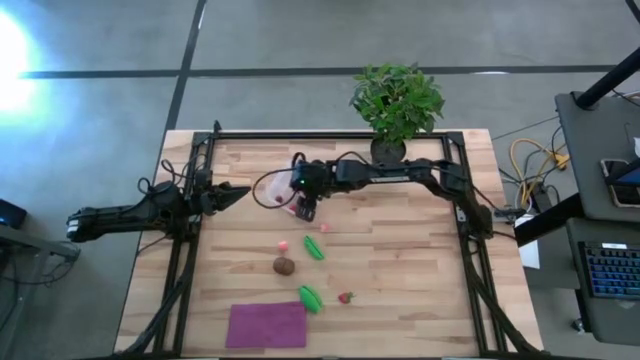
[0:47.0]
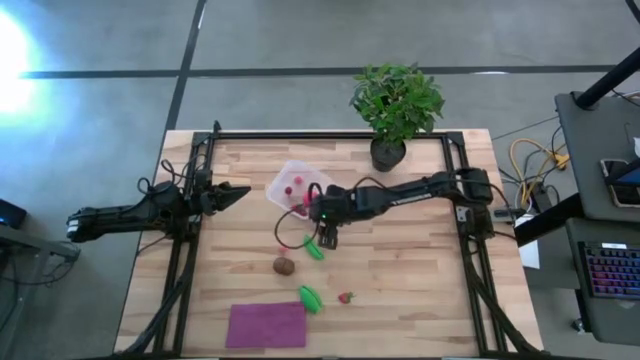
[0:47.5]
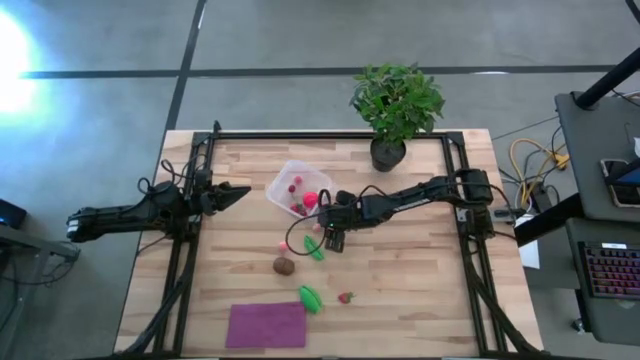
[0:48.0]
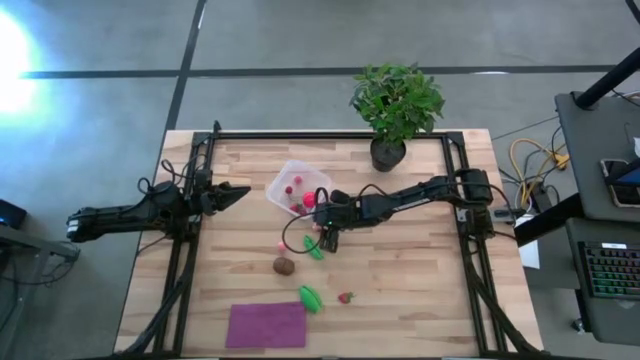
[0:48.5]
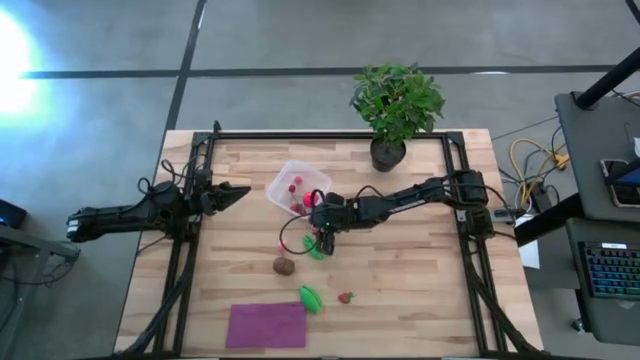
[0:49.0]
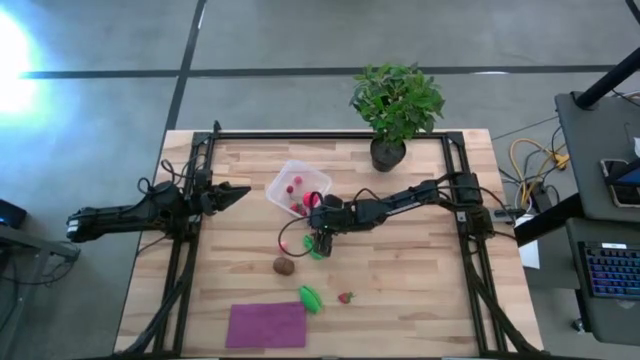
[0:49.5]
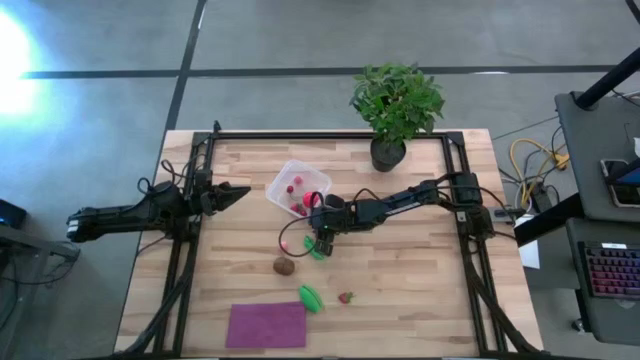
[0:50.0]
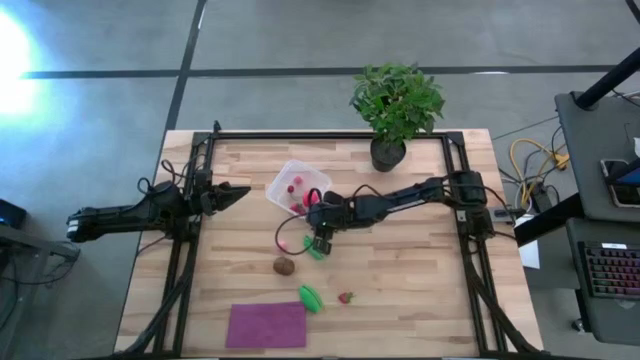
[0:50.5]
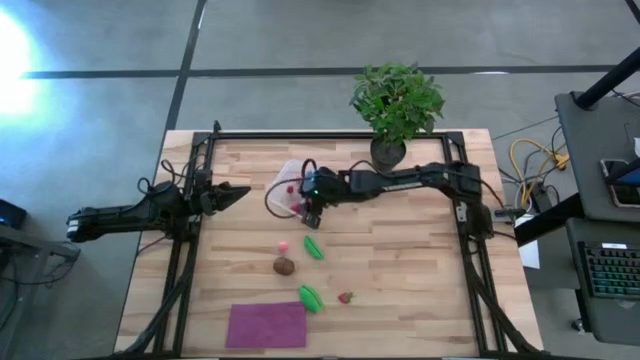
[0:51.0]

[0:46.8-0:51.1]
Task: Pick and placing Produce into tupperware
Put the top peach into the transparent bin

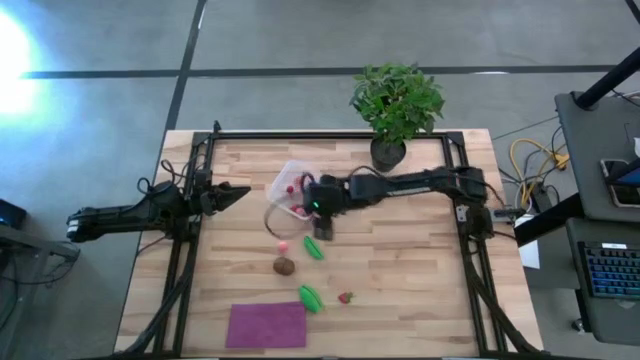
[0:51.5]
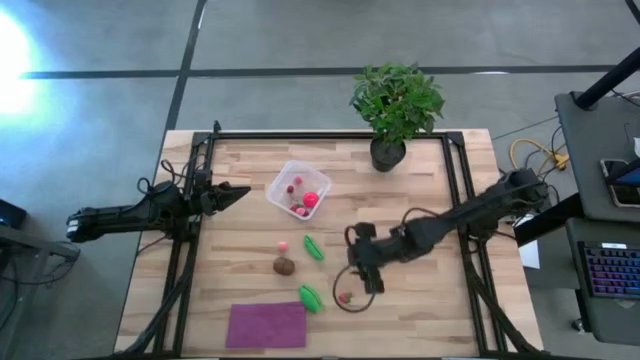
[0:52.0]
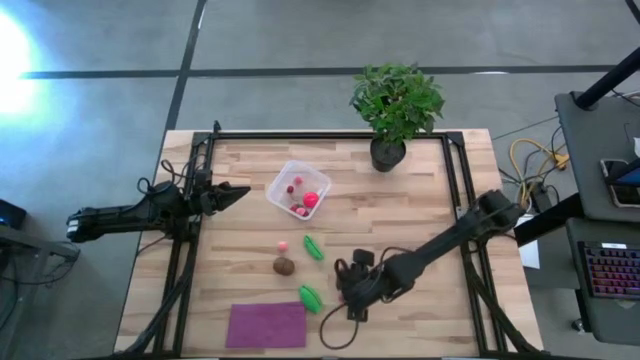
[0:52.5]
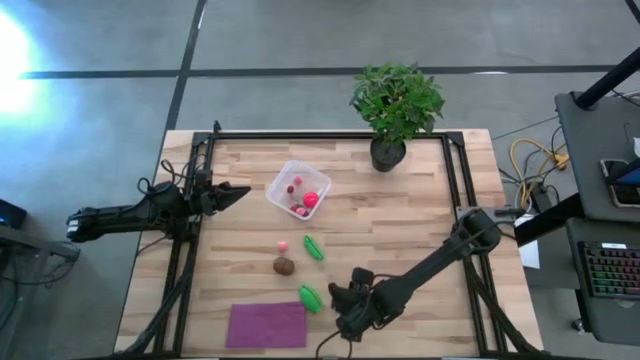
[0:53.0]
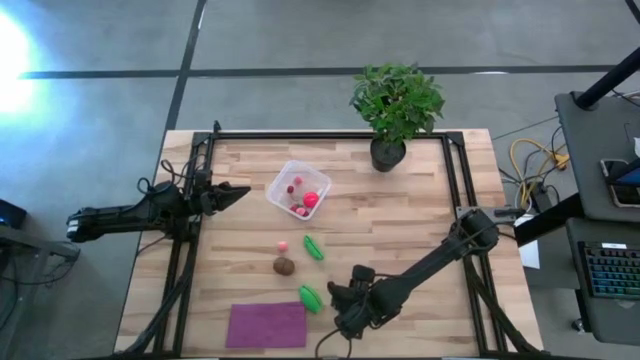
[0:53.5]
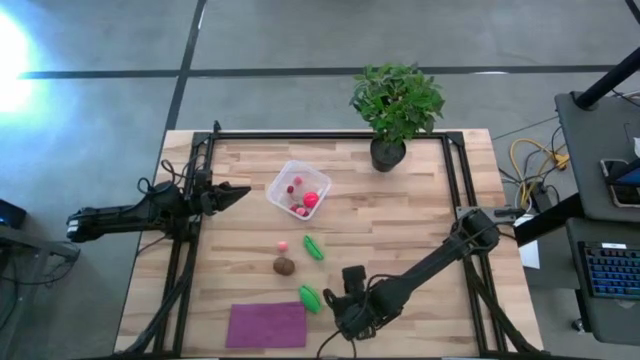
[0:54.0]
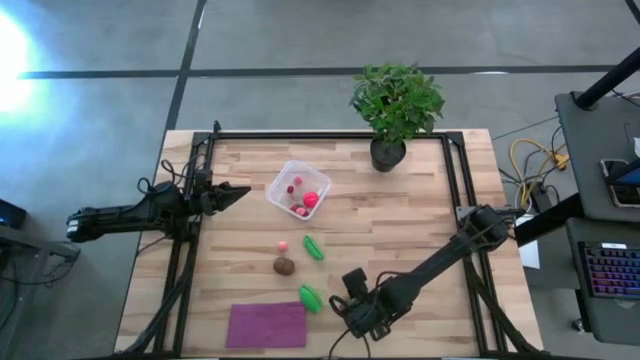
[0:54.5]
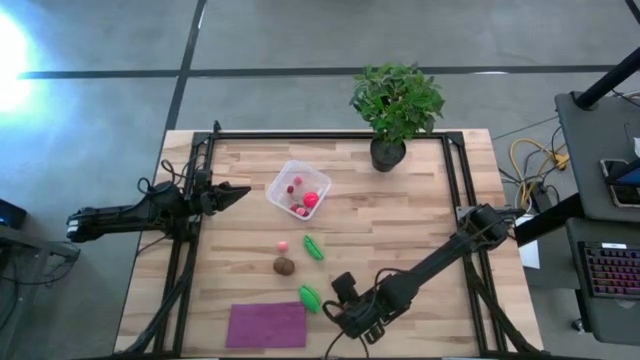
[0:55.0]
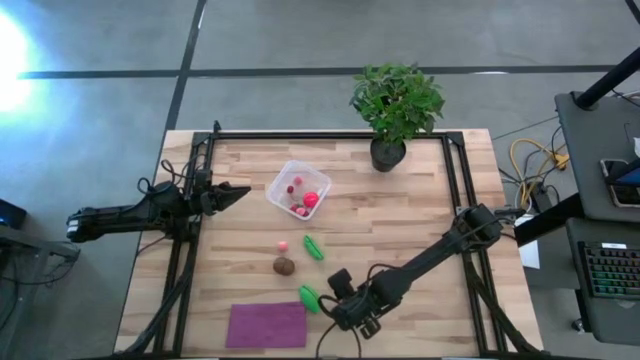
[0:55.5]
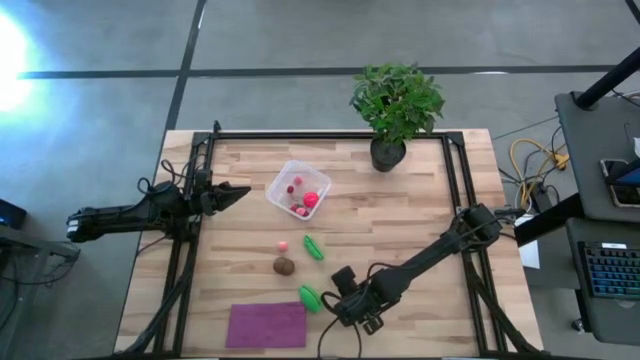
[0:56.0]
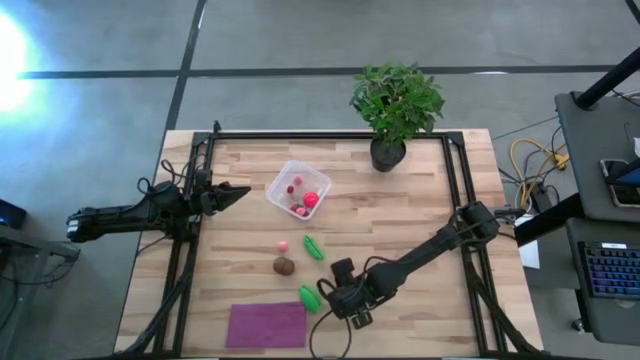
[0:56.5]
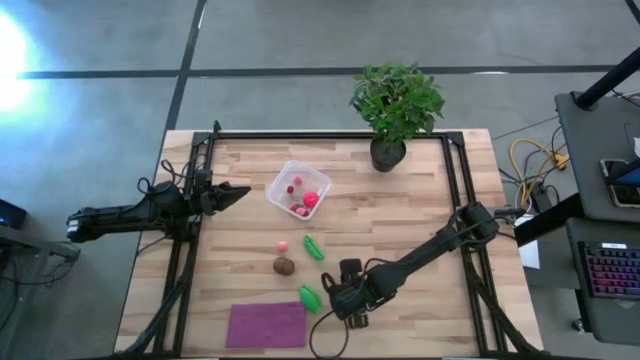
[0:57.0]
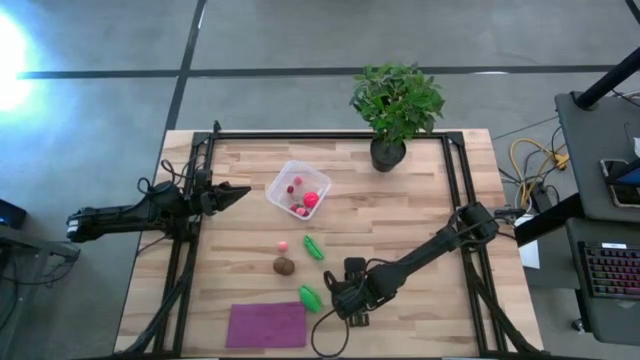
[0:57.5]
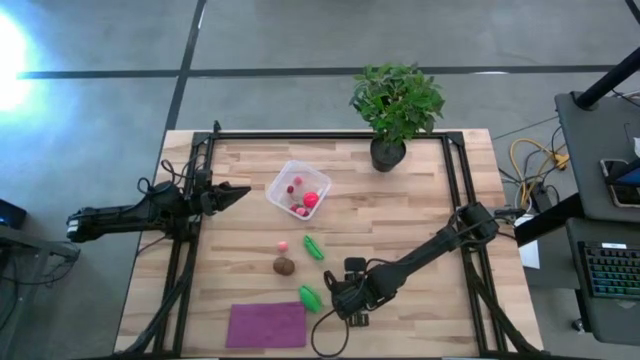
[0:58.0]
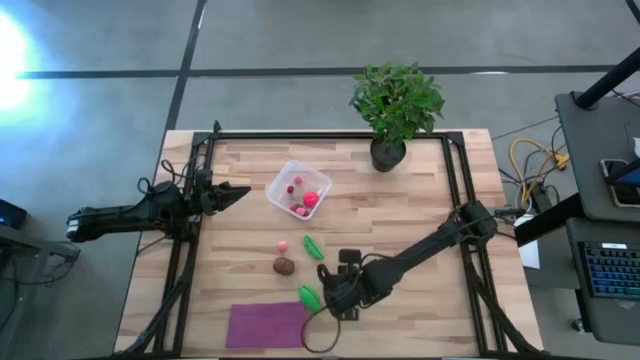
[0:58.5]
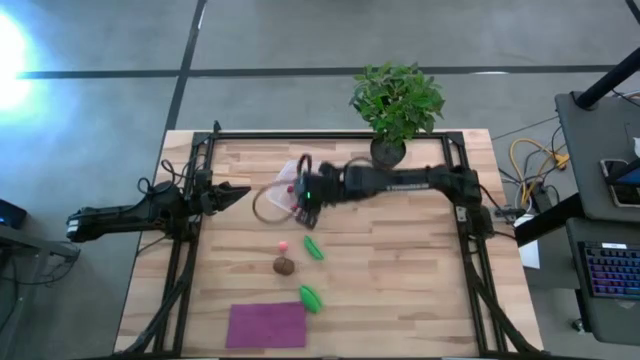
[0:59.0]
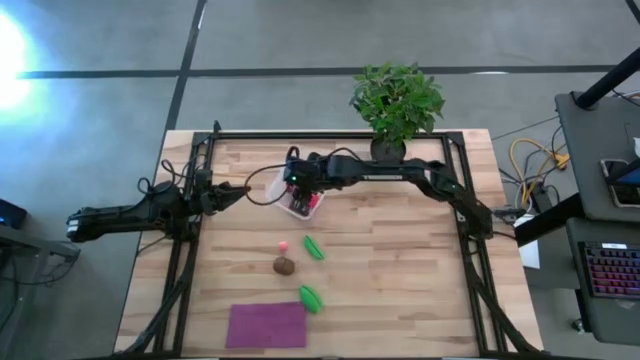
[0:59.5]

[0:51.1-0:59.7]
Put the strawberry into the transparent bin

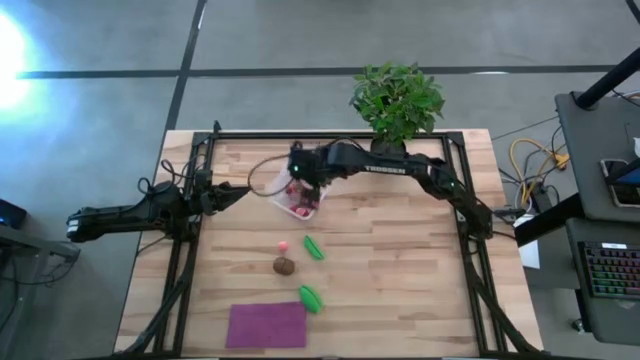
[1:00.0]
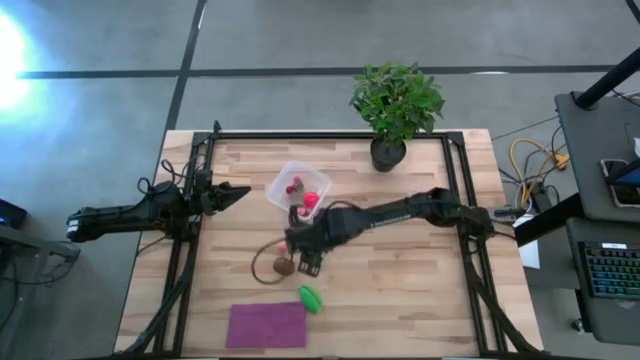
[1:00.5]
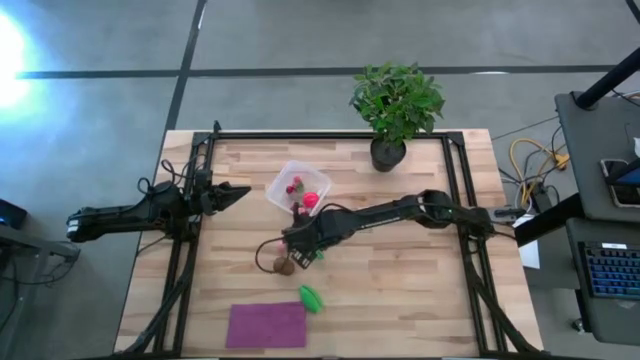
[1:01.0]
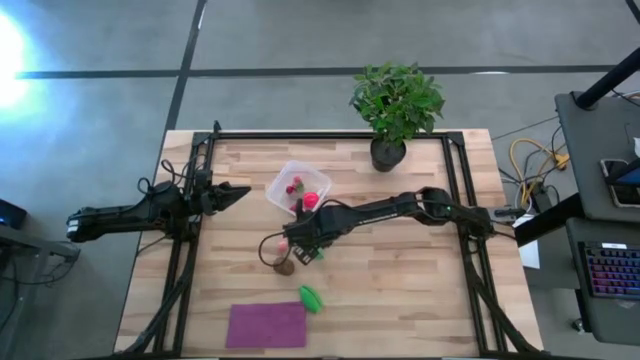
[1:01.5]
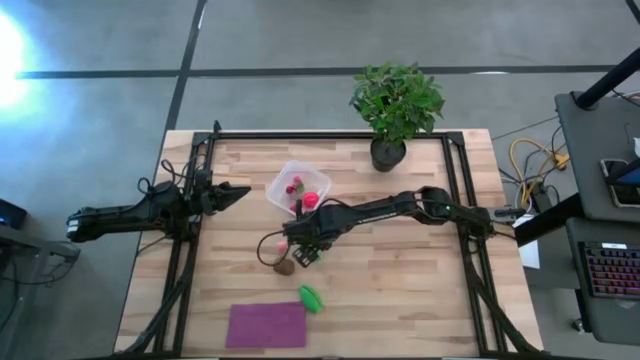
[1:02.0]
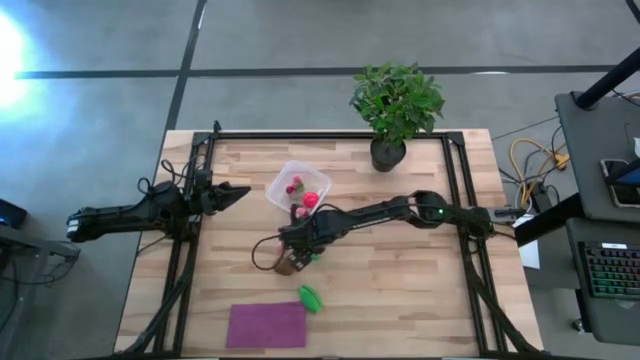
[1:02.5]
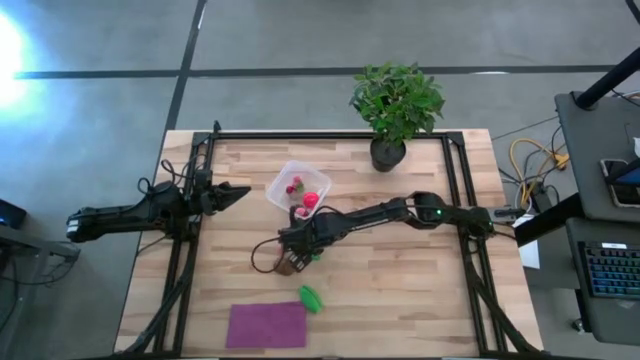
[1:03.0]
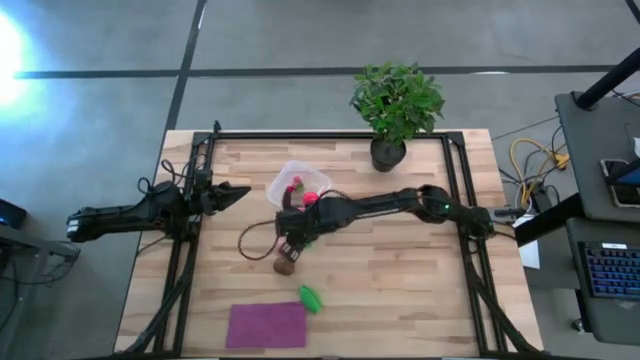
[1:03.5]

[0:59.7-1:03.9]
Put the green pea into the transparent bin

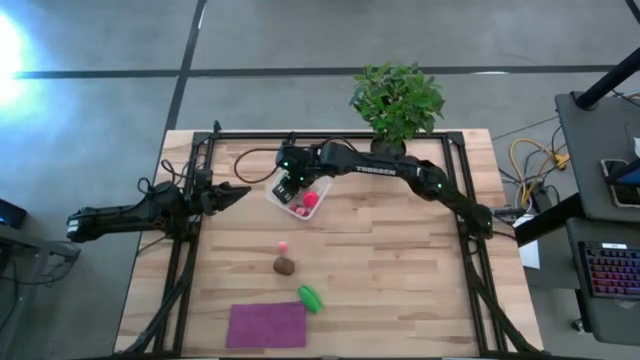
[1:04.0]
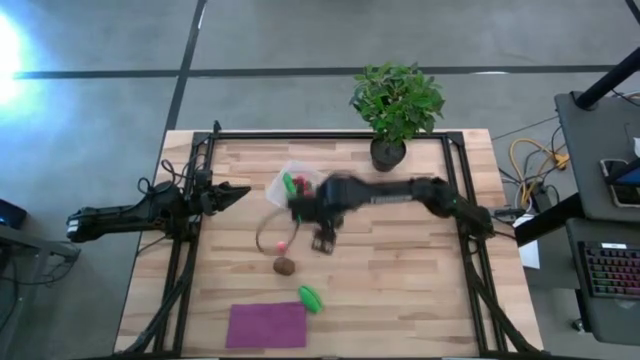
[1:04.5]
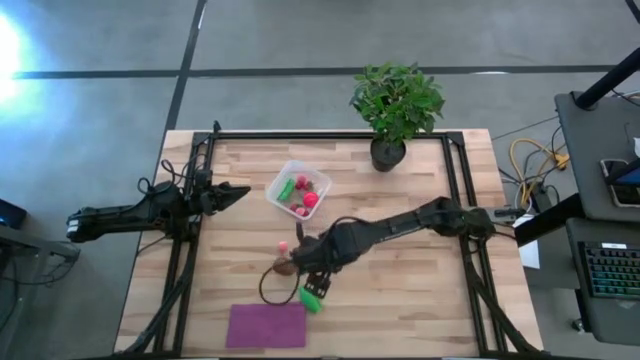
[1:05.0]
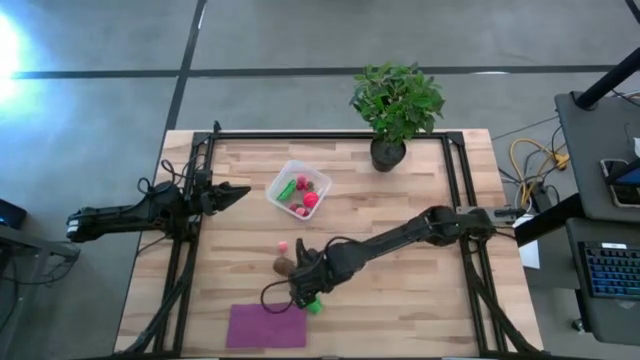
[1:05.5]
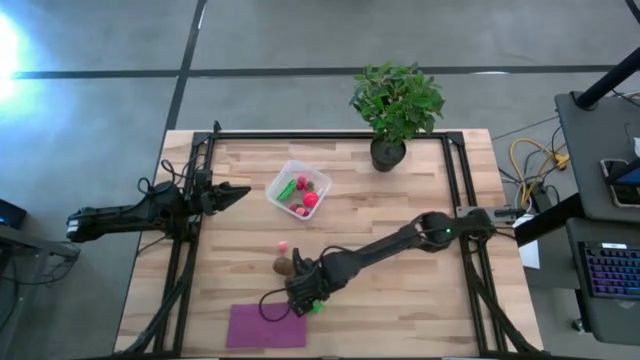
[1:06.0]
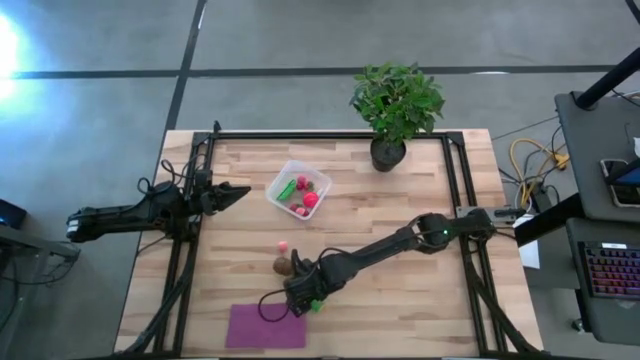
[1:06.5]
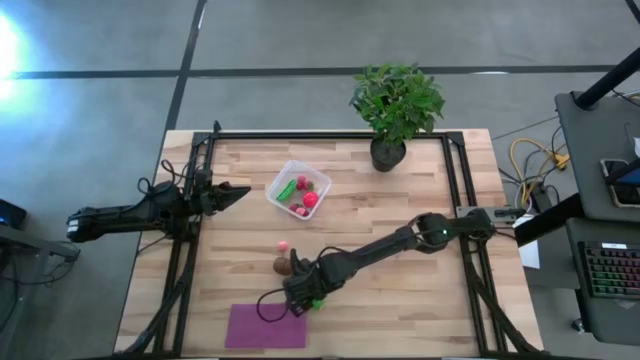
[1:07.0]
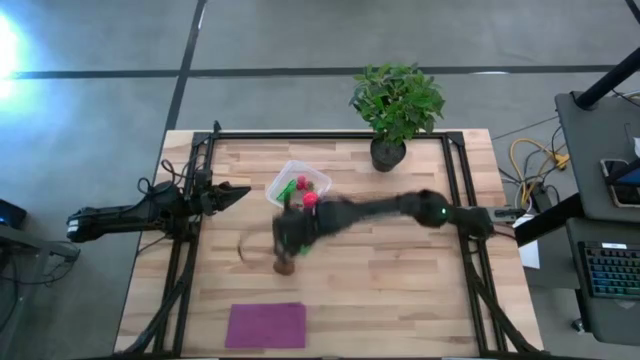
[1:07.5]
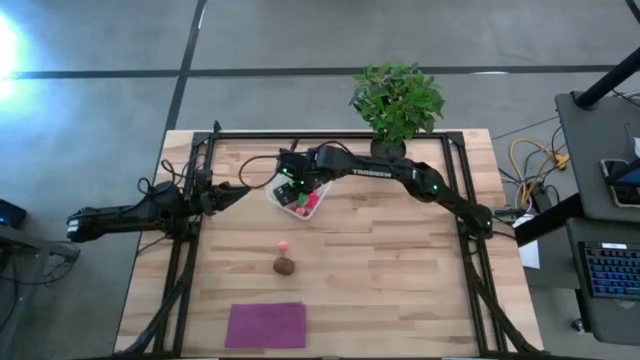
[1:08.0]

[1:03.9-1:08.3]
Put the corn into the transparent bin
